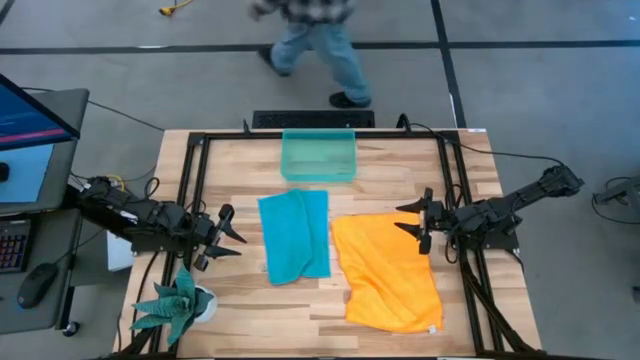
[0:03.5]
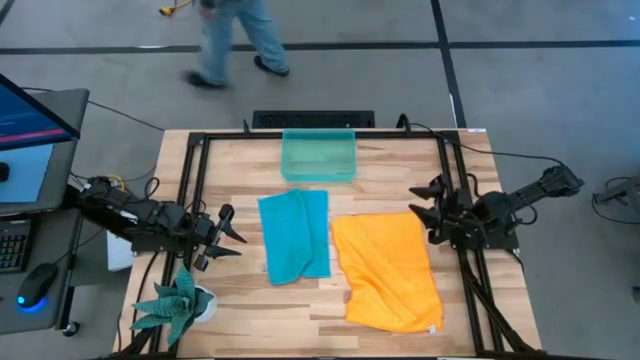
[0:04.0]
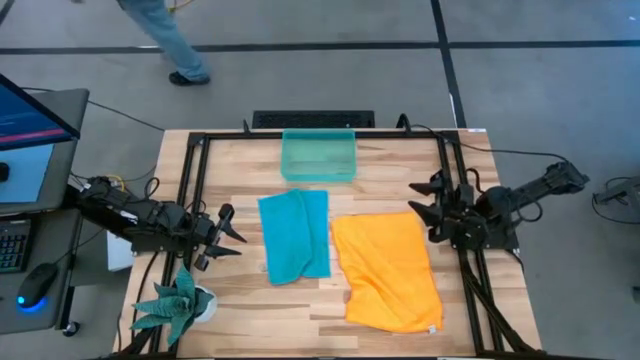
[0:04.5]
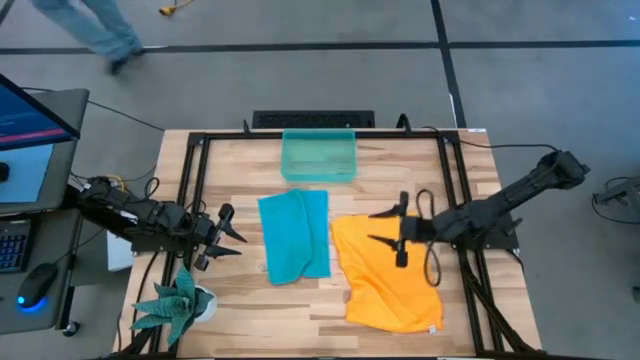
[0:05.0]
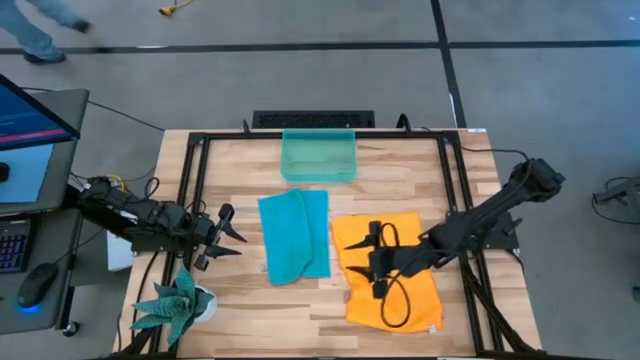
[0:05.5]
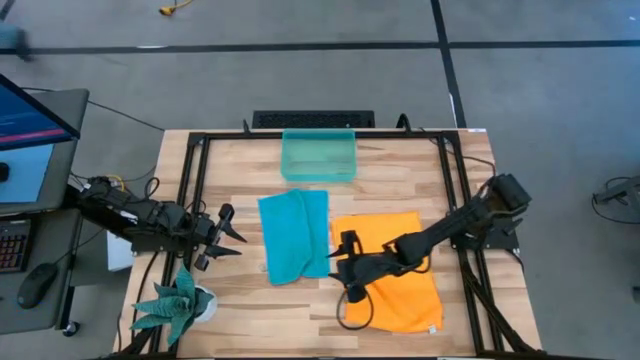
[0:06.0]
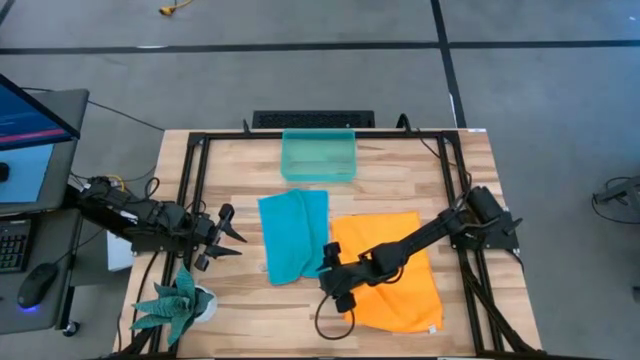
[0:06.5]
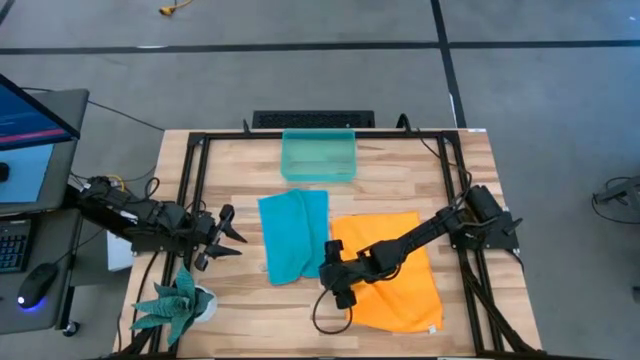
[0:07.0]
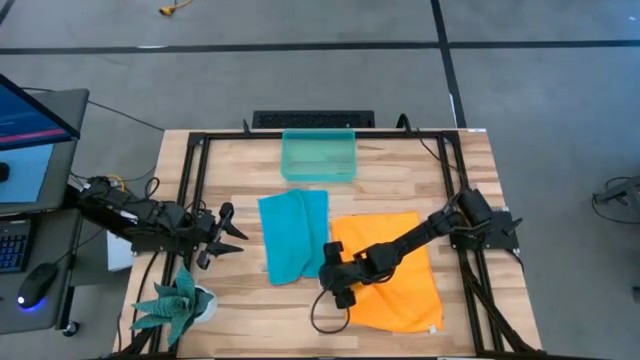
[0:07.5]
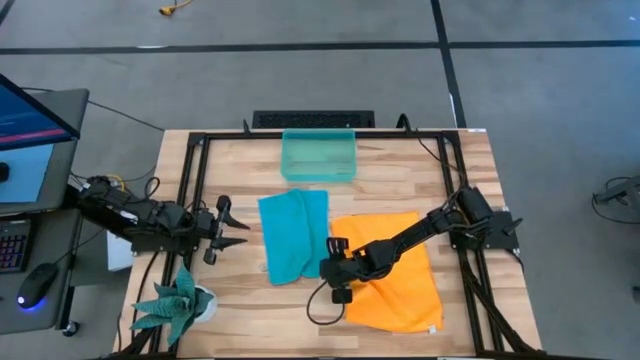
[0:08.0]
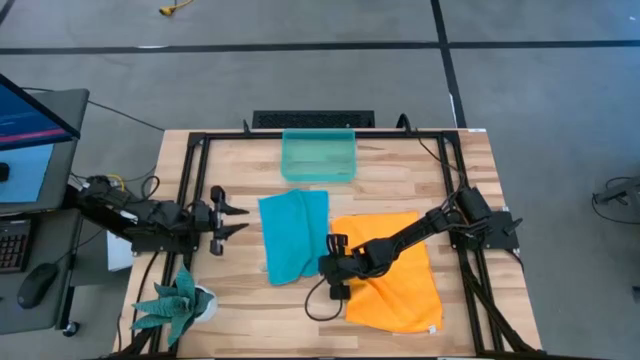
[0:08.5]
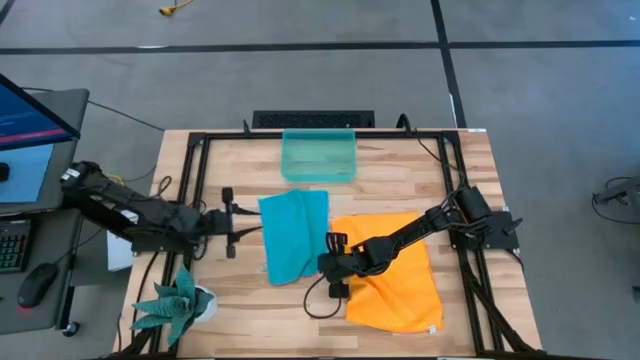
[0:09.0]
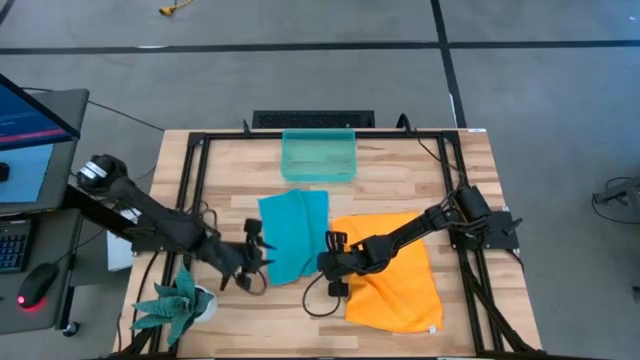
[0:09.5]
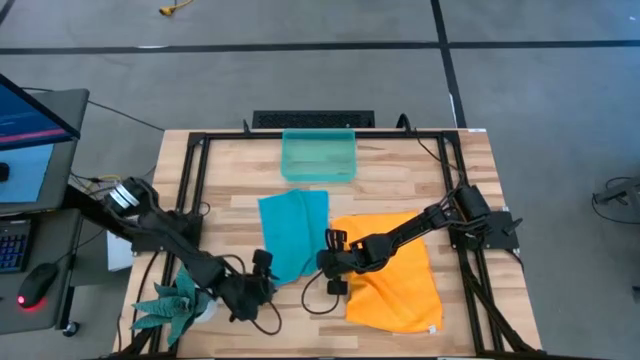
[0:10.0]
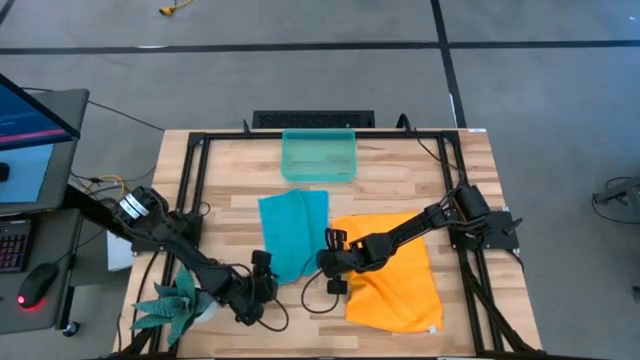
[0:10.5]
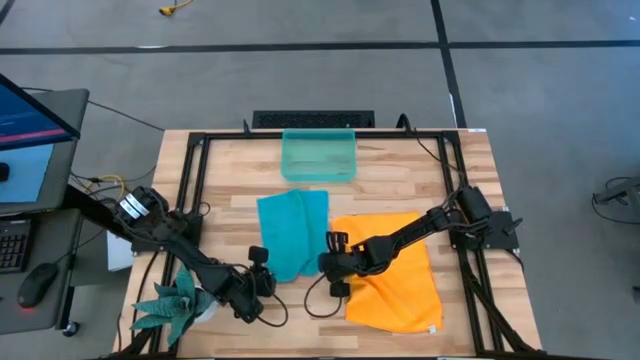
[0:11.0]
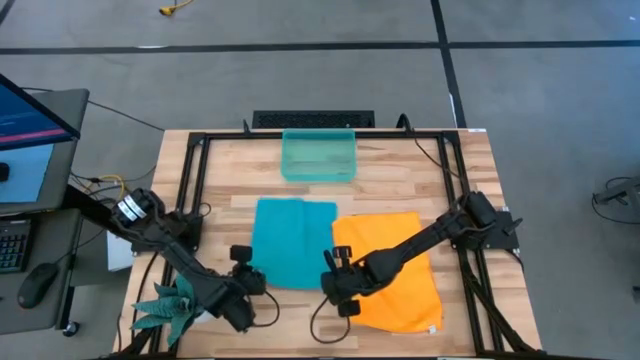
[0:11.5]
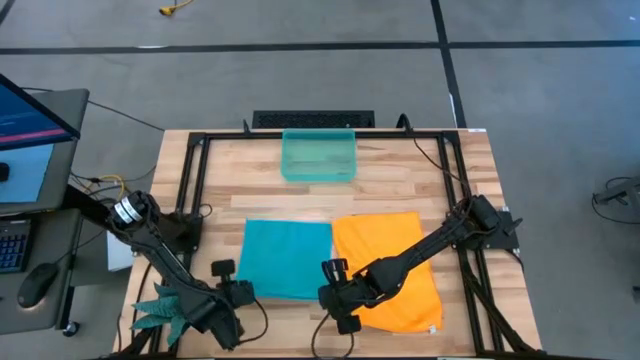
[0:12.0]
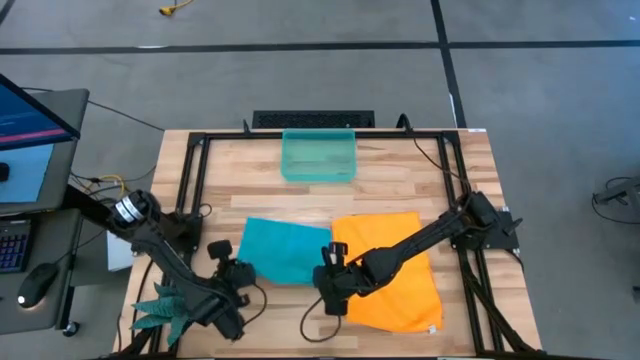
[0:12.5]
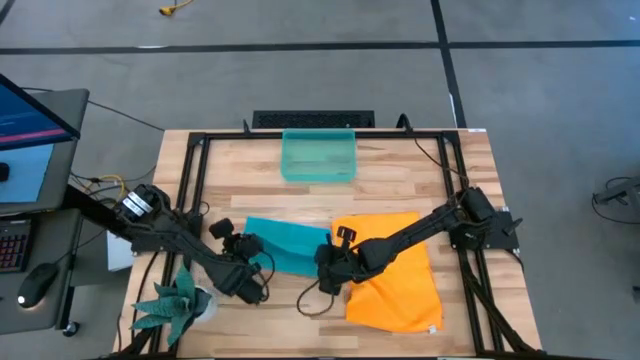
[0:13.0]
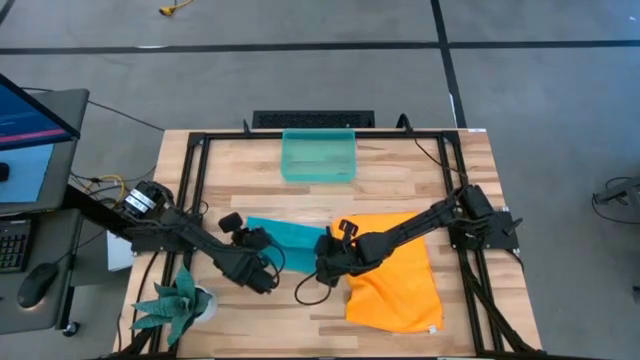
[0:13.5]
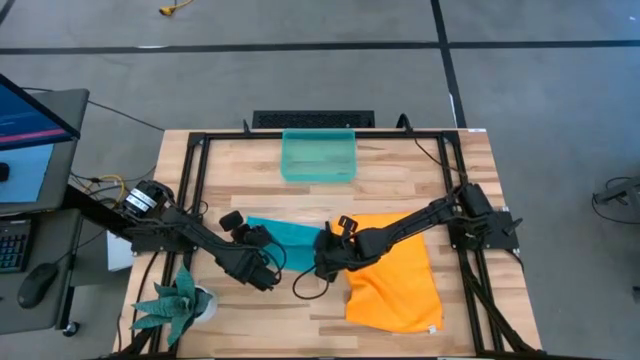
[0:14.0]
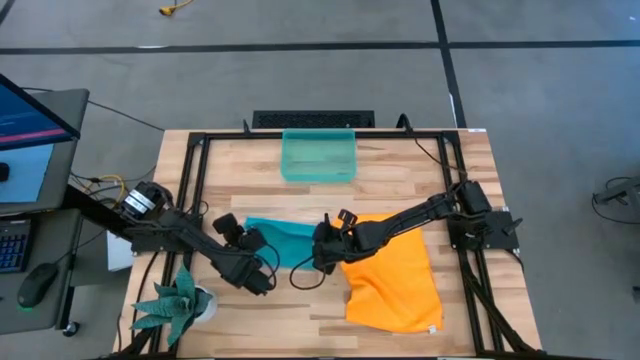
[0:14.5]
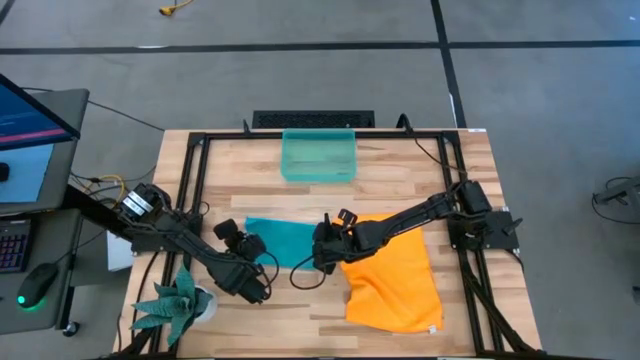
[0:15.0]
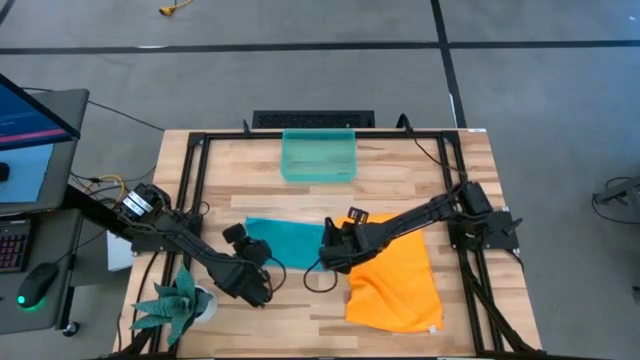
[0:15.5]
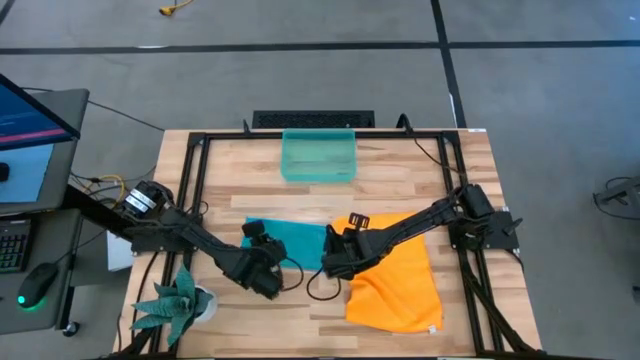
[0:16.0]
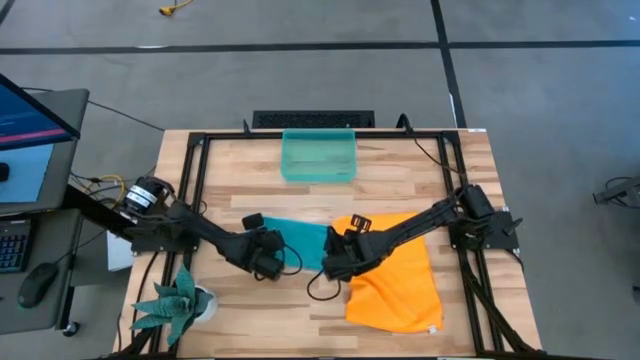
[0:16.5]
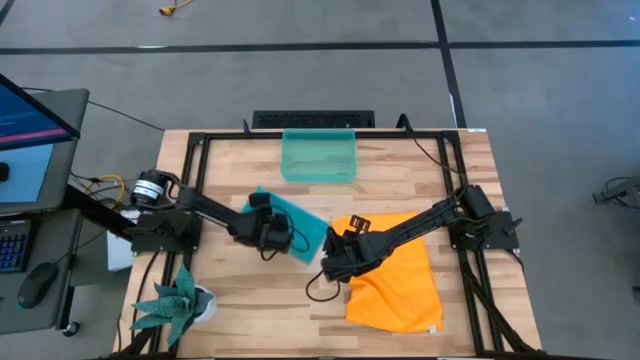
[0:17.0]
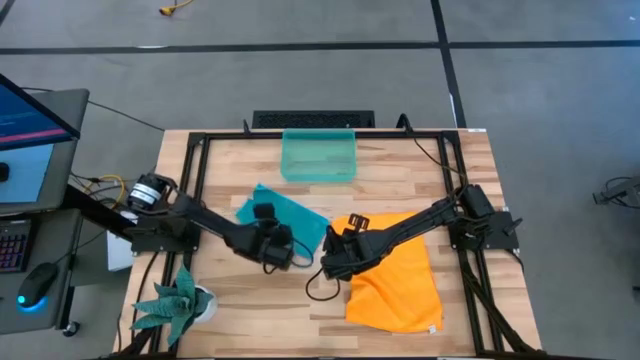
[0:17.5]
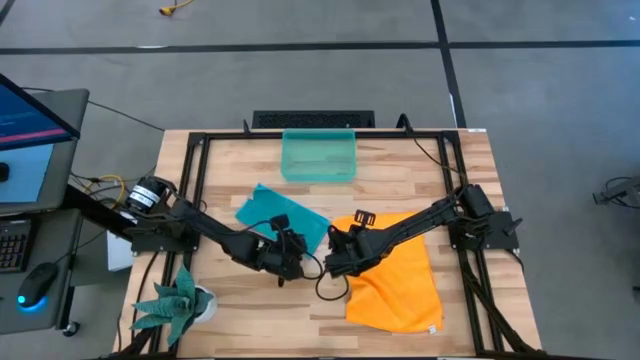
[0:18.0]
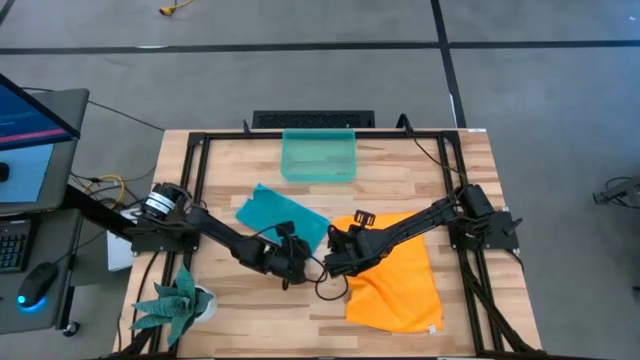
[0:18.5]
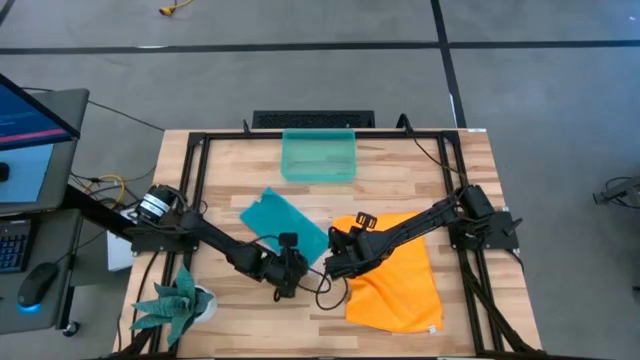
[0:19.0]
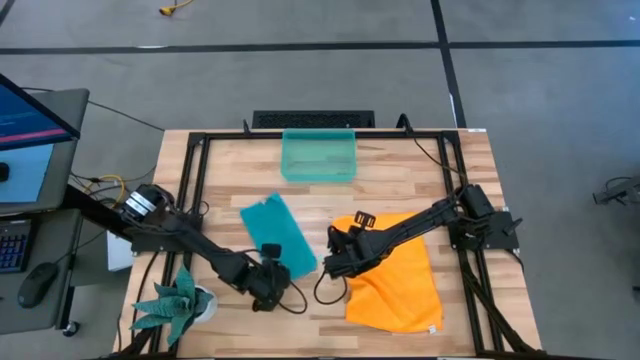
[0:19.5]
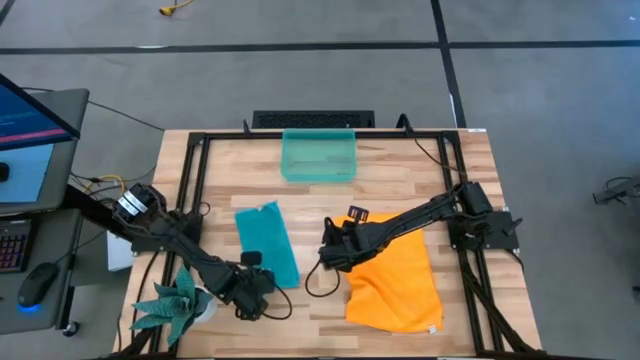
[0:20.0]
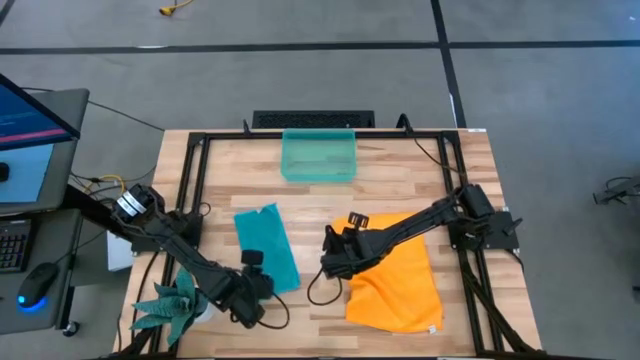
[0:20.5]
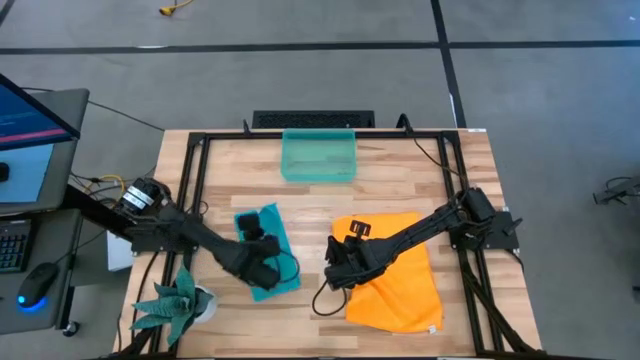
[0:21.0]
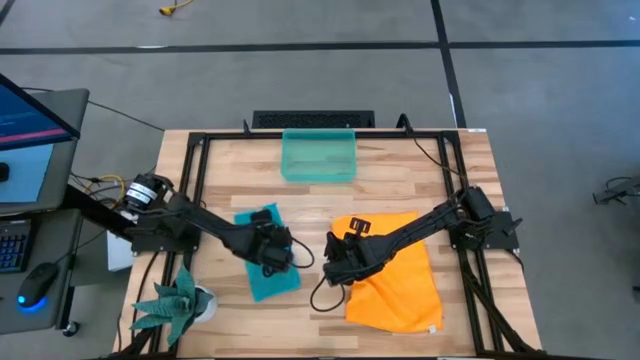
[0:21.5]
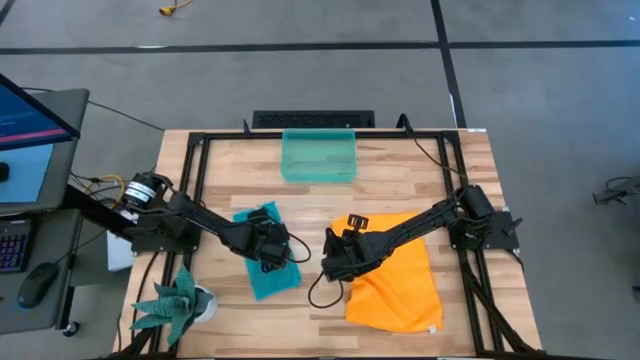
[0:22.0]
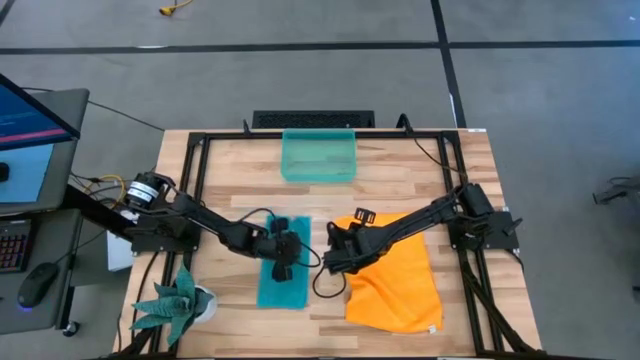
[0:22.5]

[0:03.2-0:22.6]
Task: Roll microfiber towels into tight, uniform cylinder then place into a basket
Roll the blue microfiber cloth
